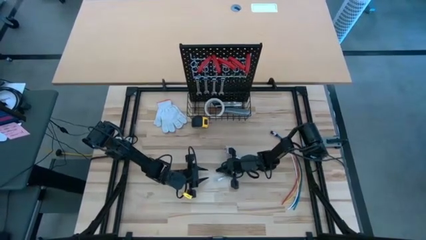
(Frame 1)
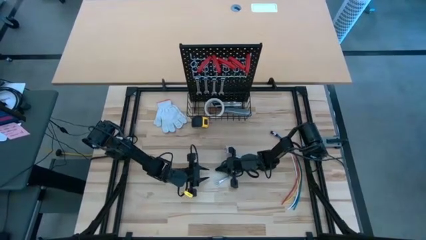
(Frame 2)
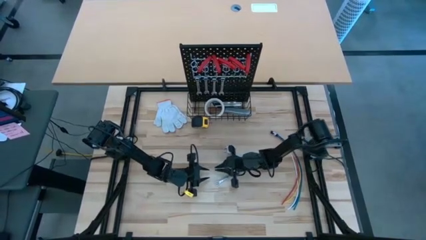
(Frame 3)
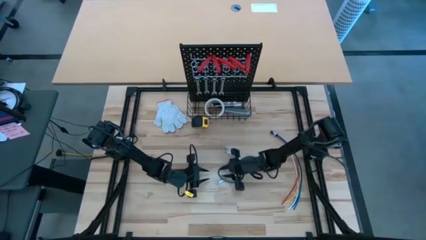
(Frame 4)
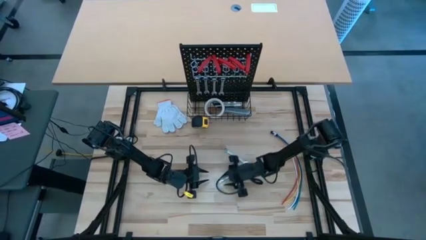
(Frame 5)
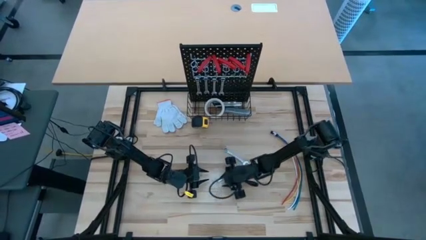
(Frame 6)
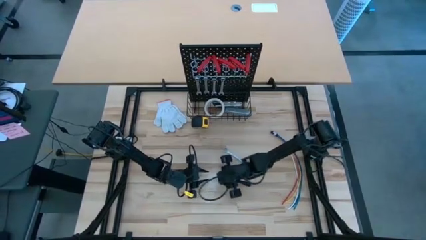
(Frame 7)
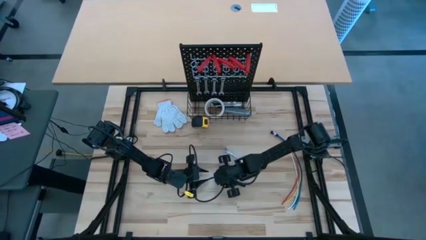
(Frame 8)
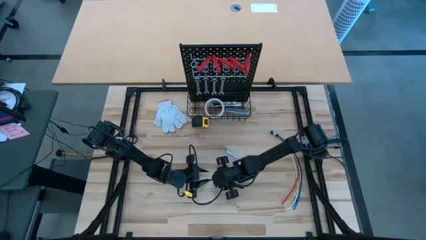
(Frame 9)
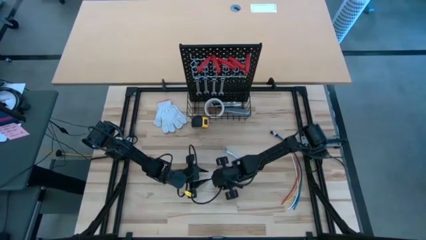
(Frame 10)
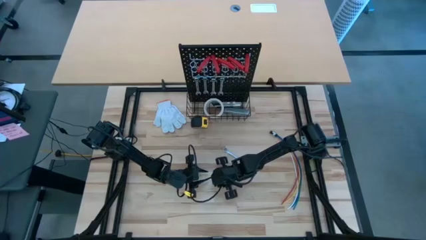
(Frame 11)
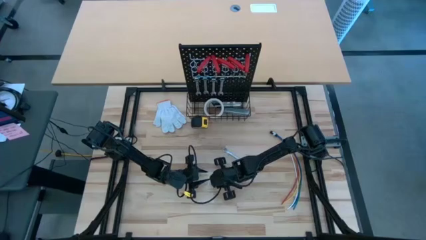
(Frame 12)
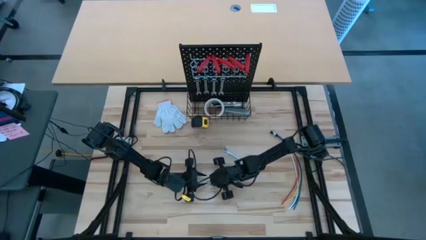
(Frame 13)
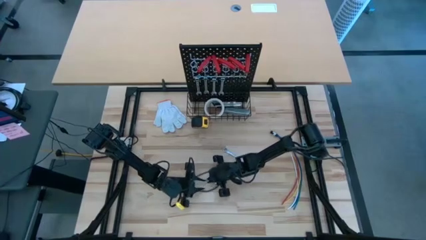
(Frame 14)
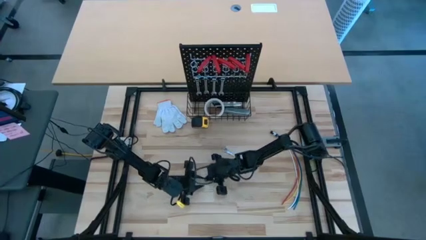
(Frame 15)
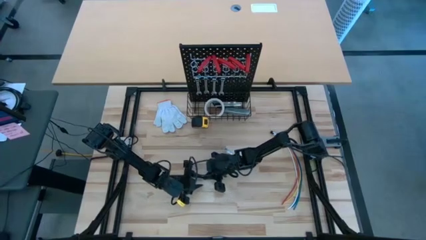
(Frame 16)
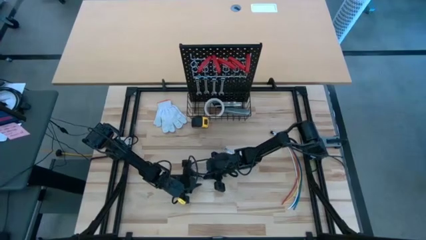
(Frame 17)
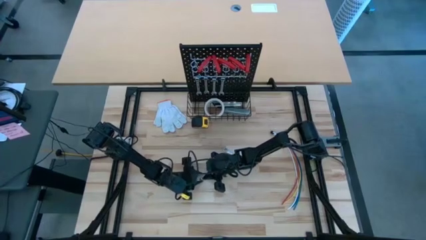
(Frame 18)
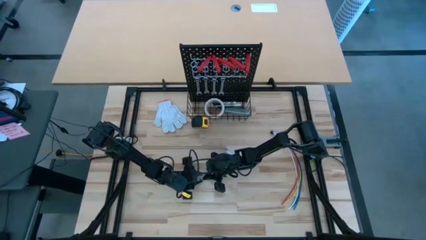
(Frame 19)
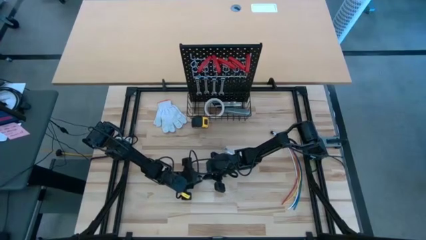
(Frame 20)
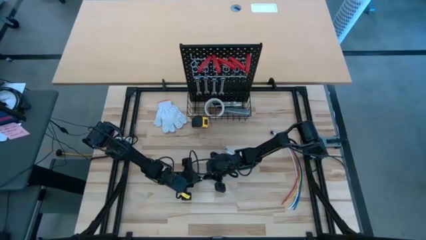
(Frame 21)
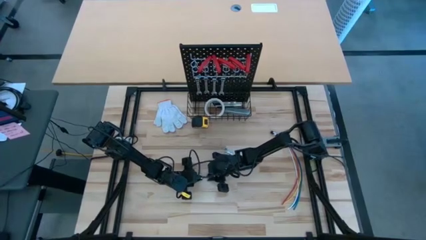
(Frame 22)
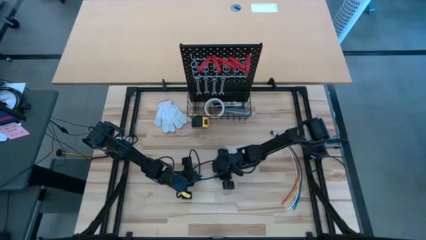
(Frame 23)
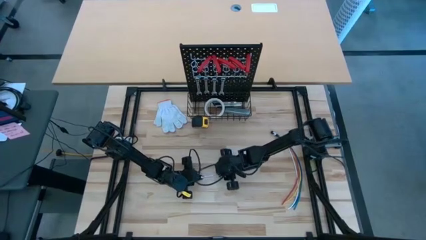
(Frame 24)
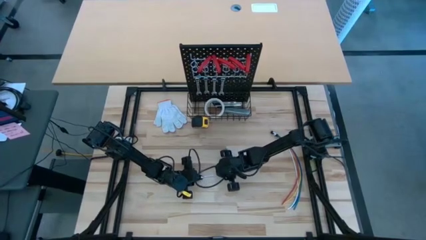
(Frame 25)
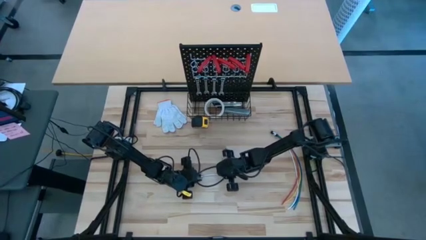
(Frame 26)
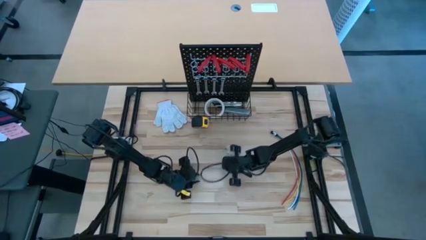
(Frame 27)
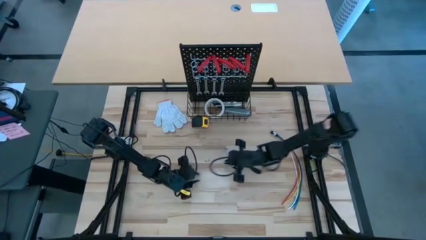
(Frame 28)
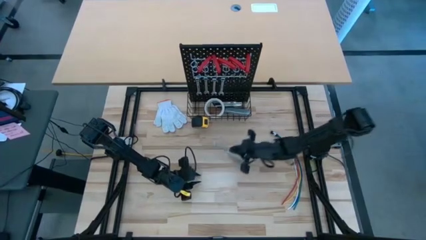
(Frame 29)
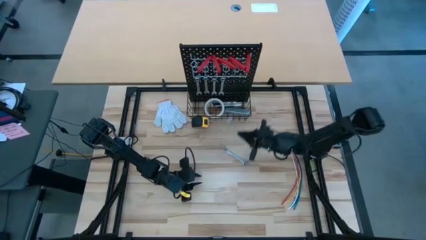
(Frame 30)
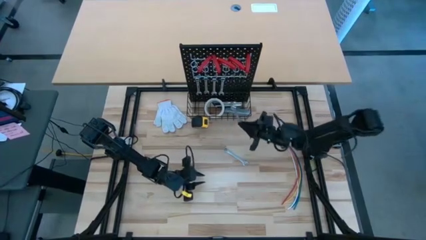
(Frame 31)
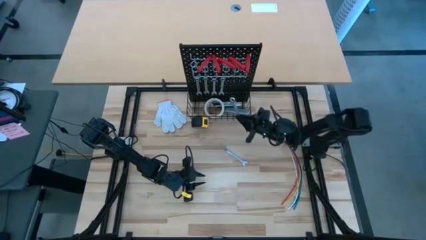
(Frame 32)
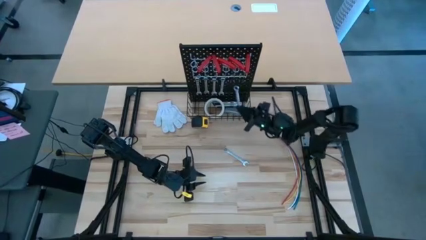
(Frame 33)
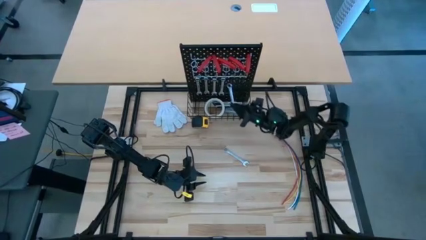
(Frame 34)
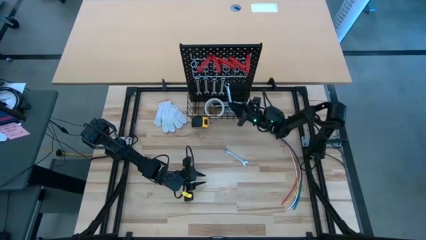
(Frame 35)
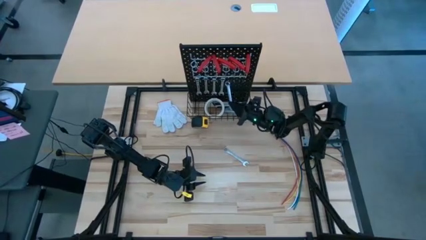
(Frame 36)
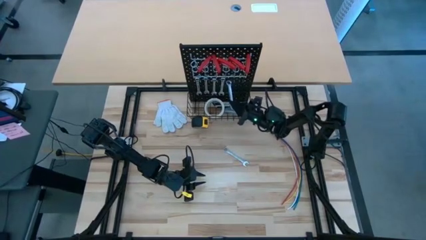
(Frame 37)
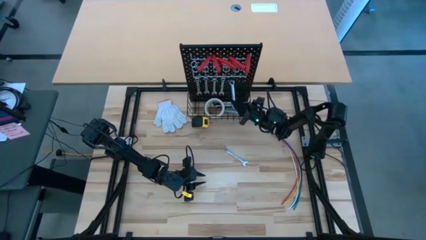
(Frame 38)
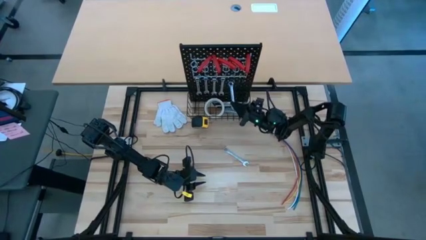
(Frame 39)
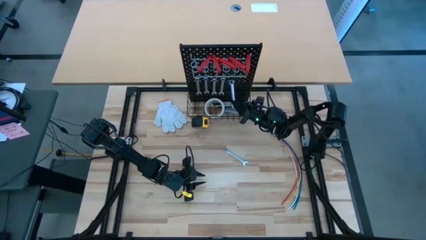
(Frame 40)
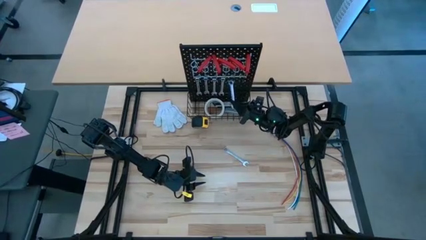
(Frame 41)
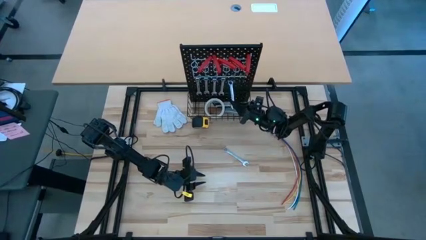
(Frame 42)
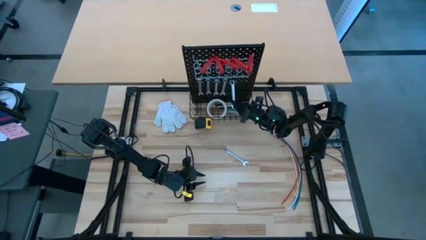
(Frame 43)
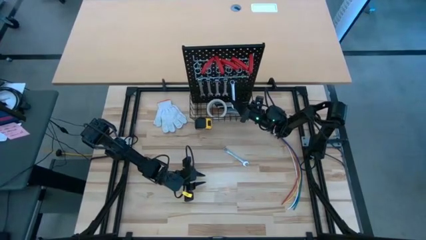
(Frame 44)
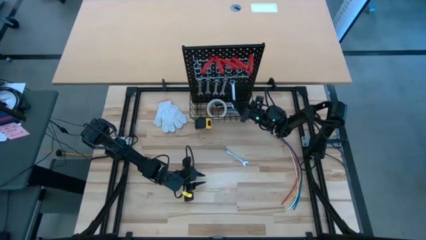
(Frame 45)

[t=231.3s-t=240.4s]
Task: Hang tools onto peg board
Hang the silver wrench on the pegboard

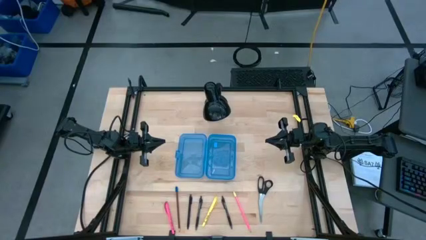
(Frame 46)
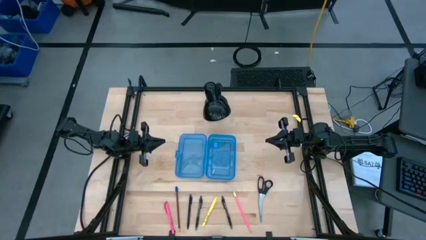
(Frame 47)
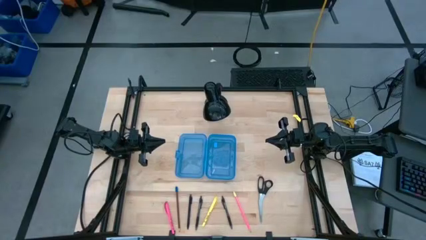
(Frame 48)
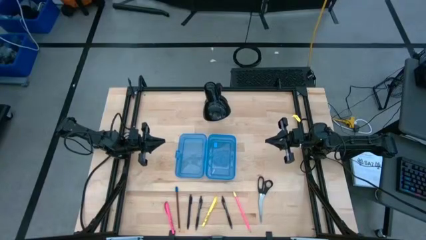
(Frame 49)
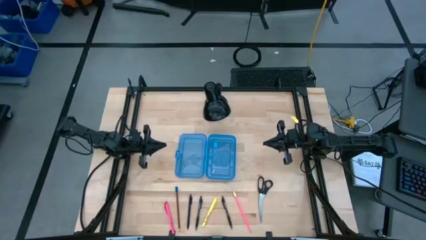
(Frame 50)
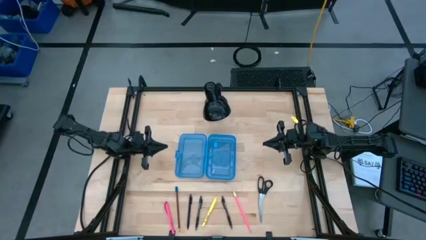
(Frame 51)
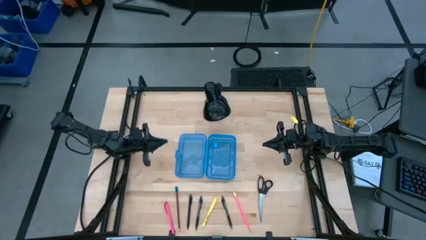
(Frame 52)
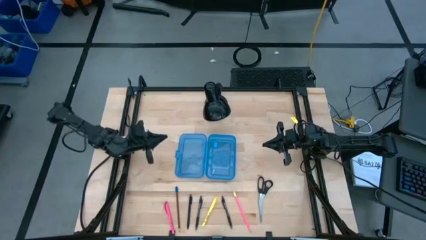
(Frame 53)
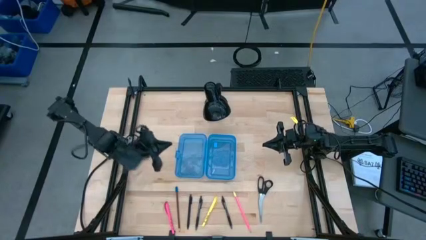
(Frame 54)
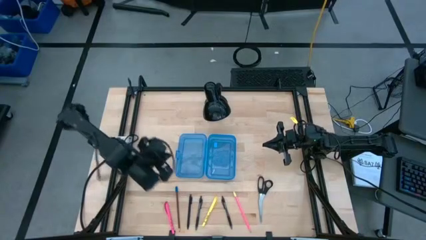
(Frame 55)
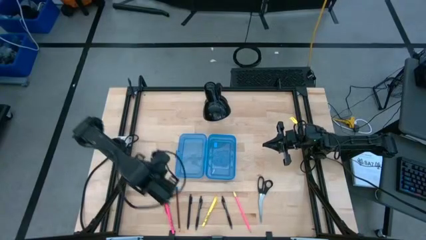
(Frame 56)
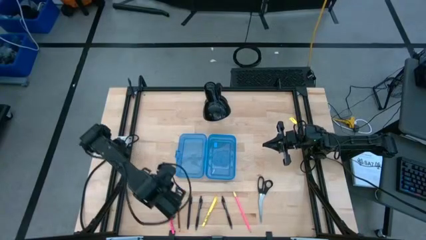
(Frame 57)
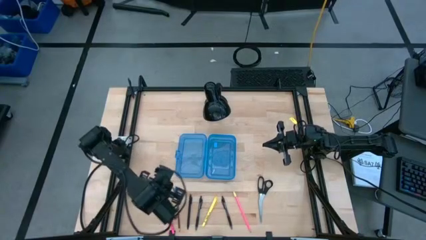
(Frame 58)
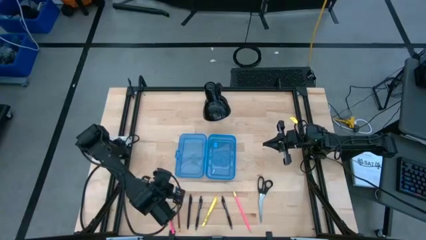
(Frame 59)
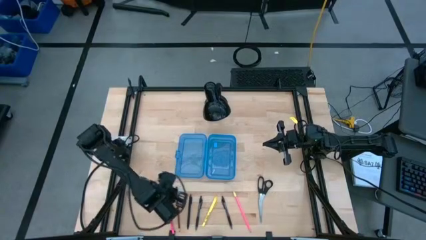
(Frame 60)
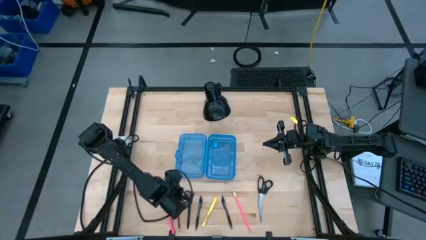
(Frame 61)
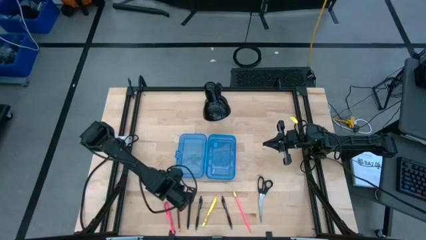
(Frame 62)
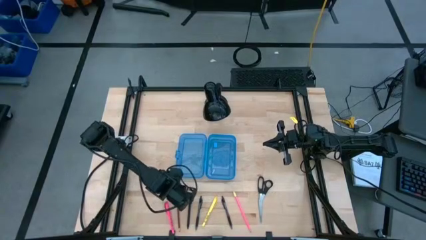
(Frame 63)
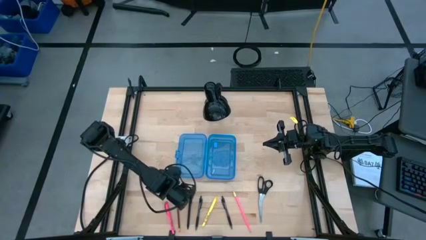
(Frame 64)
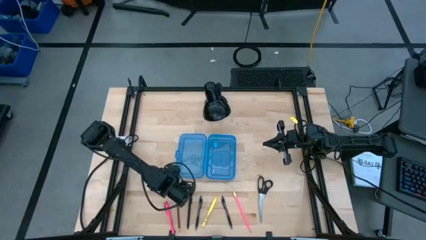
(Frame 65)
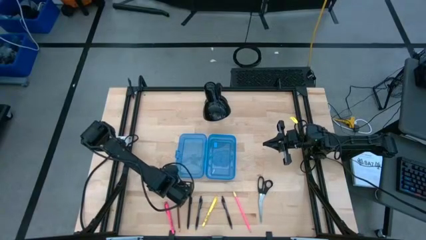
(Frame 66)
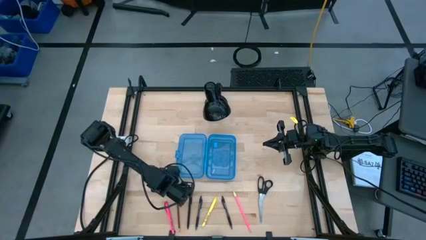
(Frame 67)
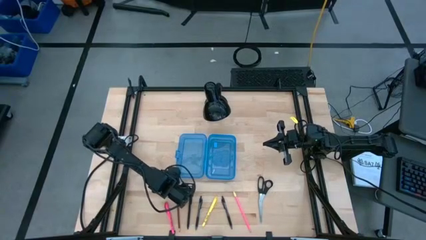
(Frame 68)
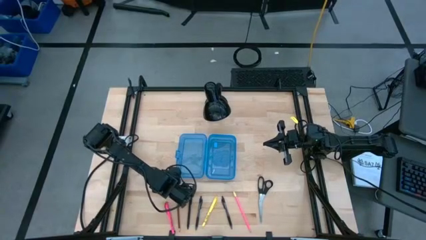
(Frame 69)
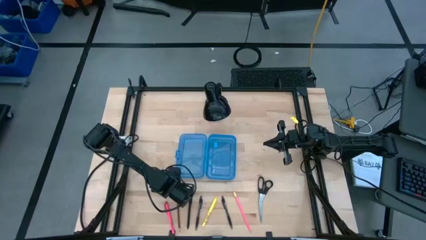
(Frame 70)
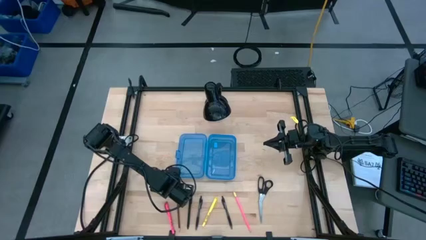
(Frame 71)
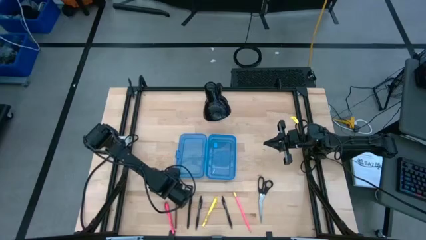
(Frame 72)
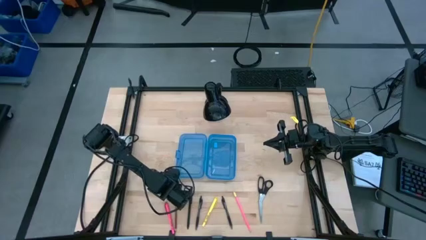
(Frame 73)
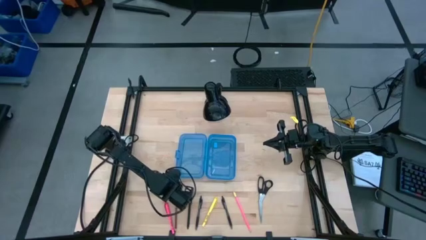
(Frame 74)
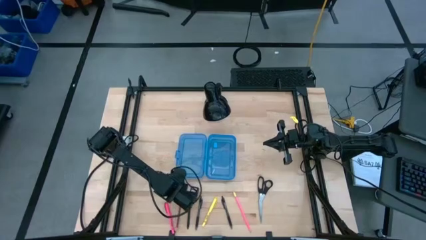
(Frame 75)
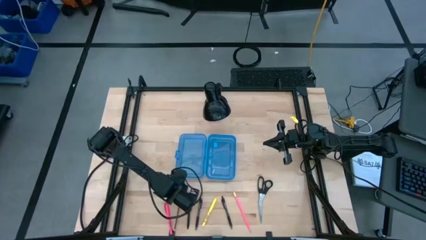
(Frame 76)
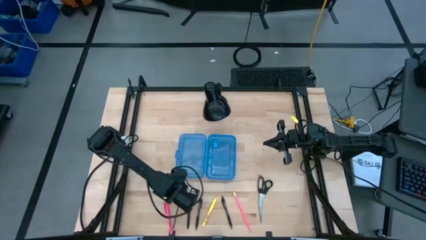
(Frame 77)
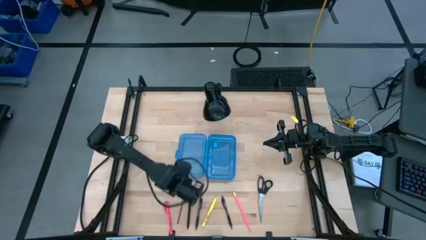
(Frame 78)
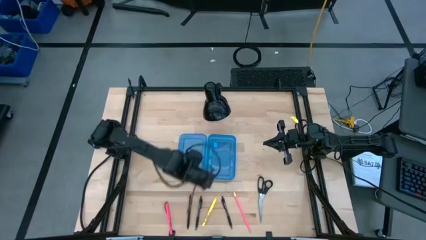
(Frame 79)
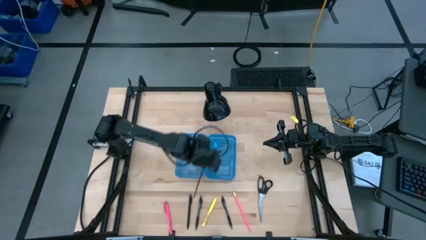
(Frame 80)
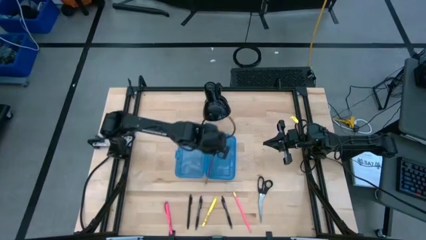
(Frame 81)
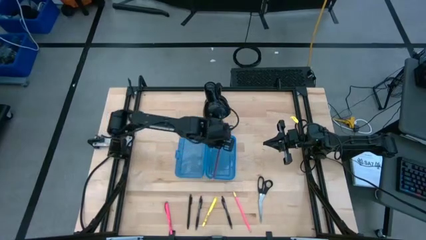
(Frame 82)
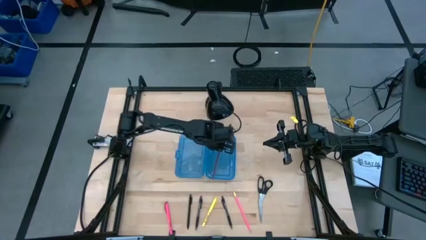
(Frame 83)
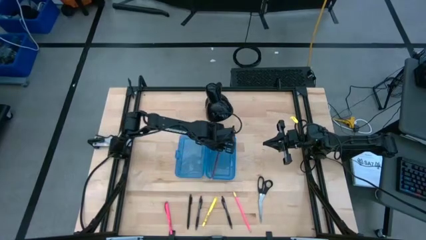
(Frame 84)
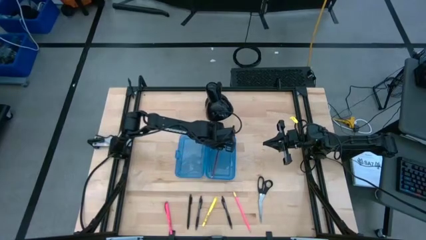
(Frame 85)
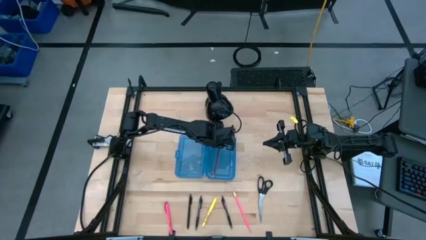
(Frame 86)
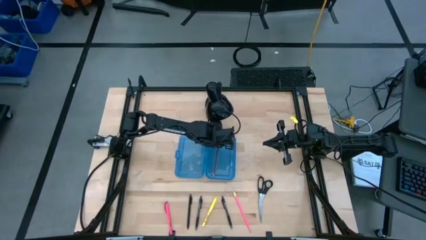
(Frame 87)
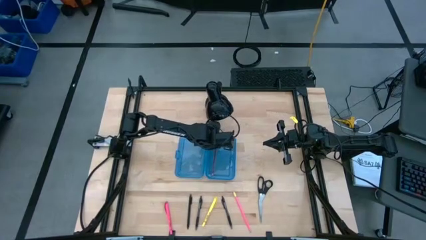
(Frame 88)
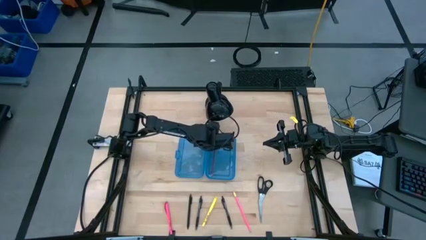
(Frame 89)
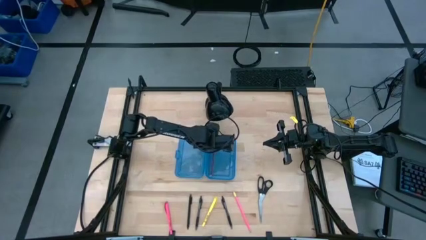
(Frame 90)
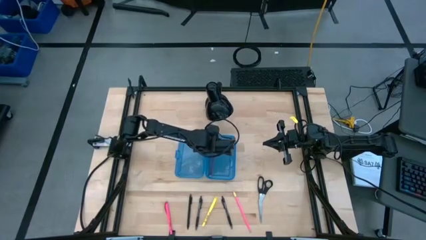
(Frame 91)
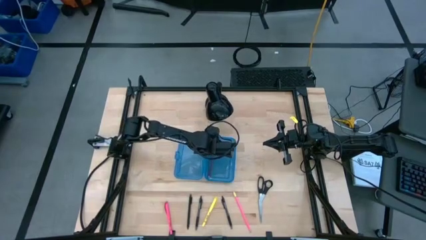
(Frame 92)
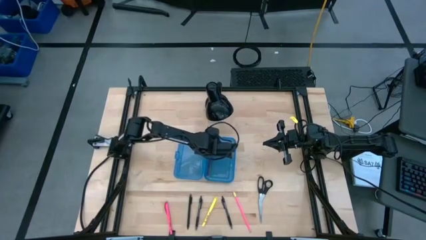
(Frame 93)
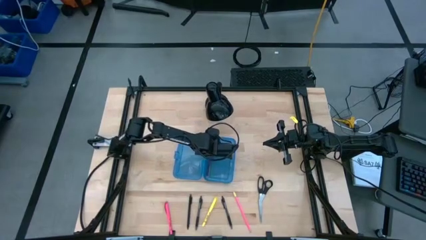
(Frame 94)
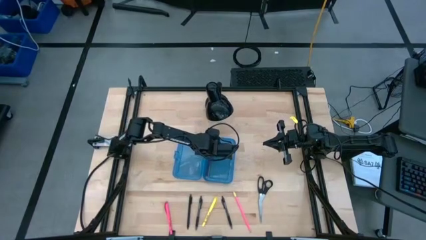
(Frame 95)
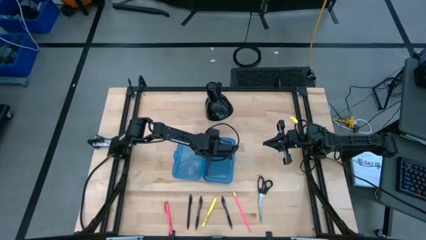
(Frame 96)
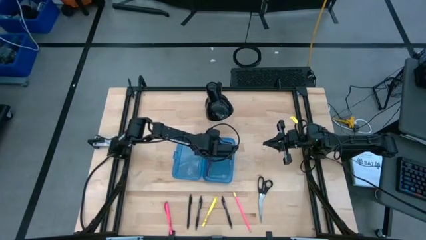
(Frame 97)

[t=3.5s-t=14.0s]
Task: Pick & place school supplies into a supply box
Put the brown pencil into the blue supply box
